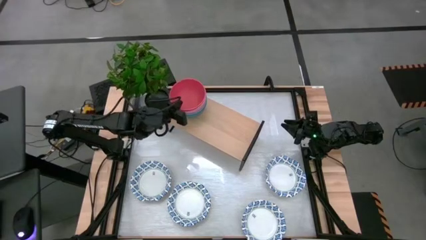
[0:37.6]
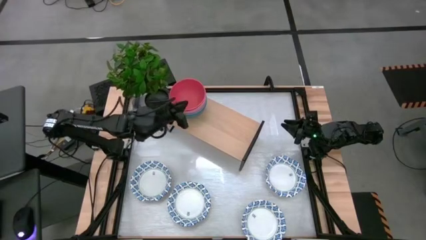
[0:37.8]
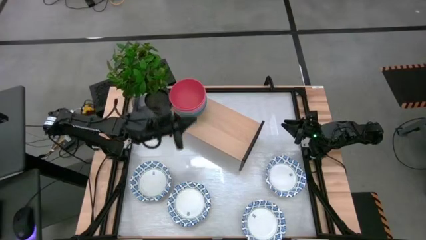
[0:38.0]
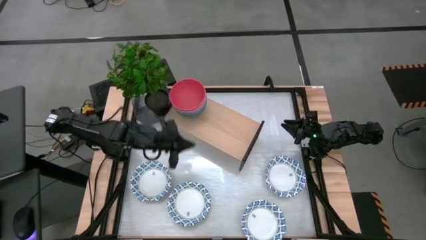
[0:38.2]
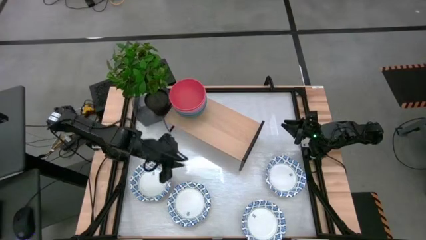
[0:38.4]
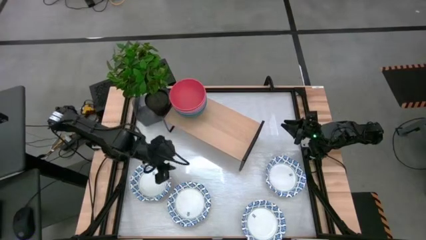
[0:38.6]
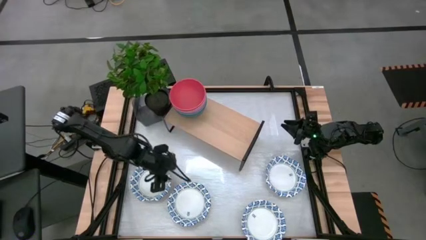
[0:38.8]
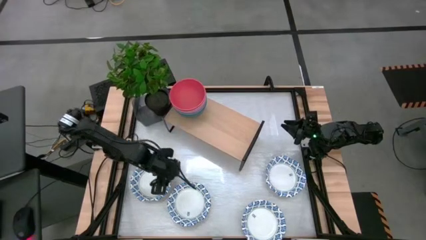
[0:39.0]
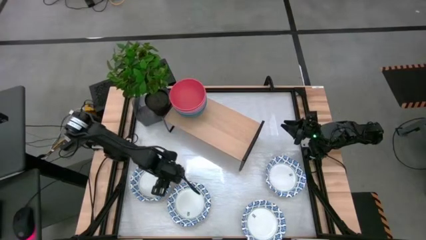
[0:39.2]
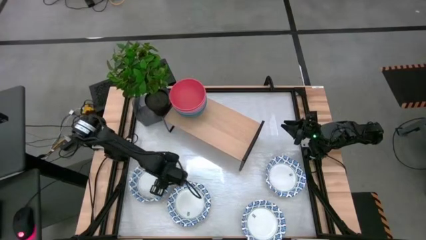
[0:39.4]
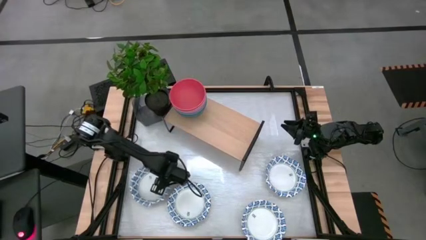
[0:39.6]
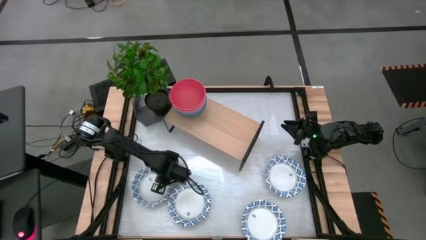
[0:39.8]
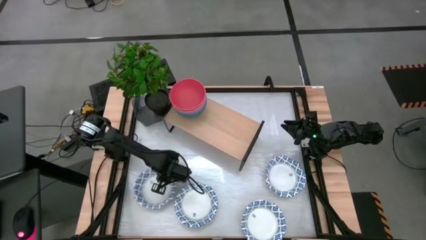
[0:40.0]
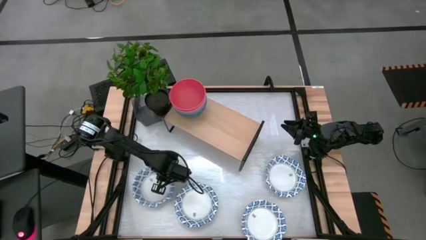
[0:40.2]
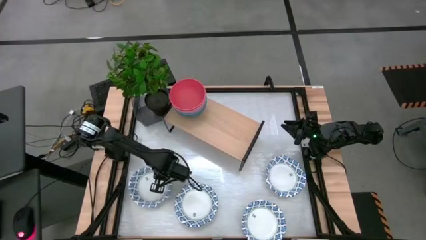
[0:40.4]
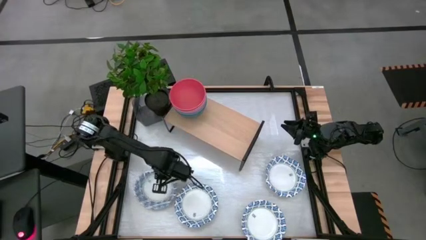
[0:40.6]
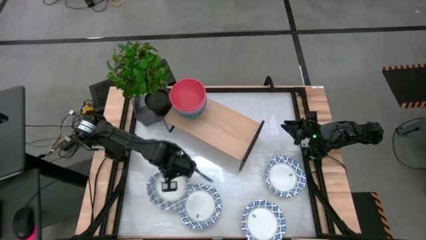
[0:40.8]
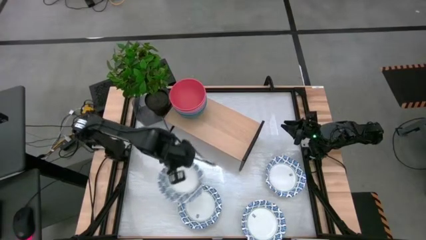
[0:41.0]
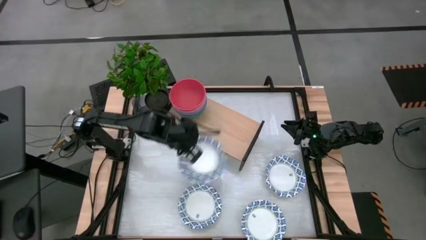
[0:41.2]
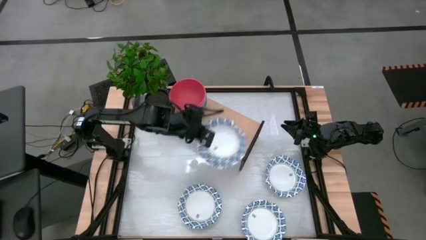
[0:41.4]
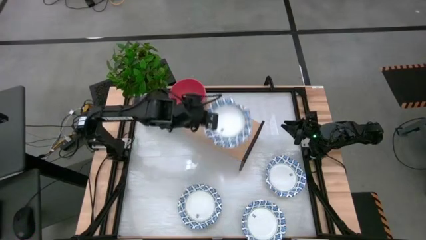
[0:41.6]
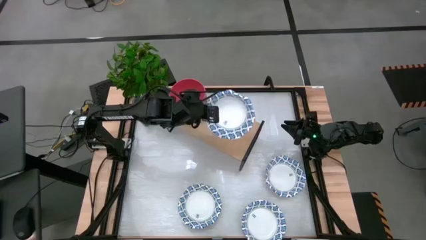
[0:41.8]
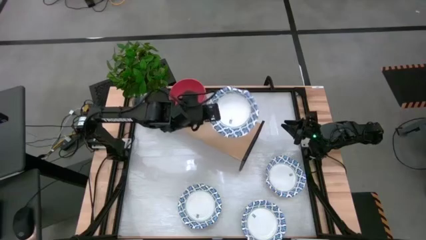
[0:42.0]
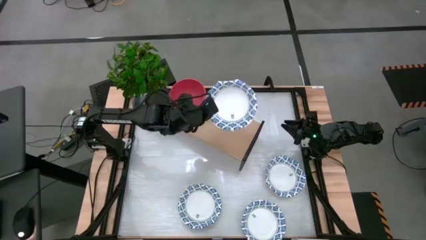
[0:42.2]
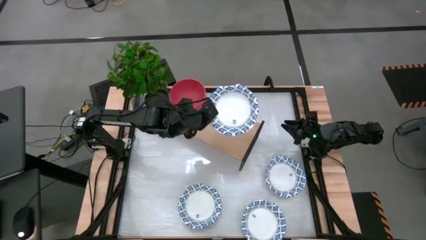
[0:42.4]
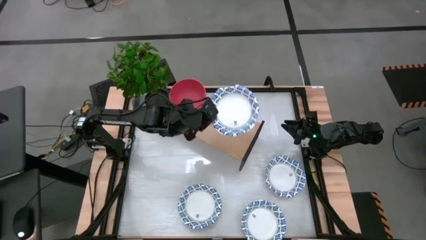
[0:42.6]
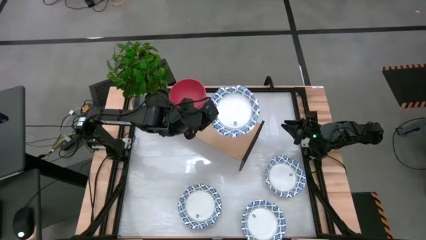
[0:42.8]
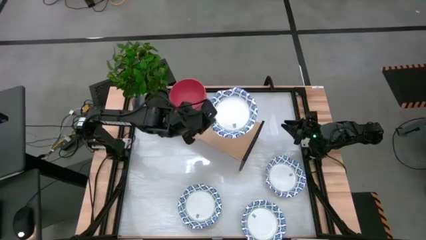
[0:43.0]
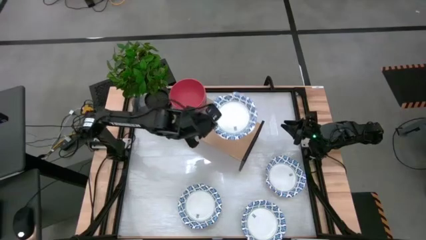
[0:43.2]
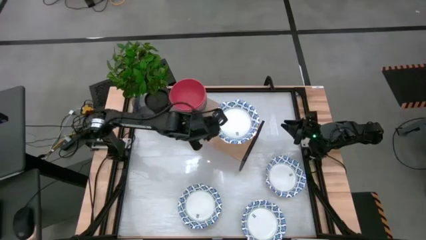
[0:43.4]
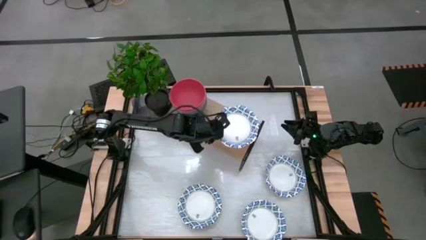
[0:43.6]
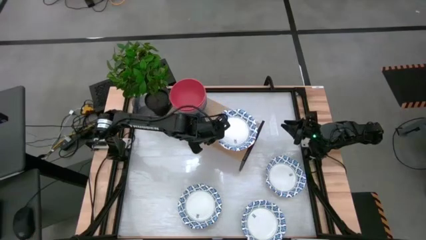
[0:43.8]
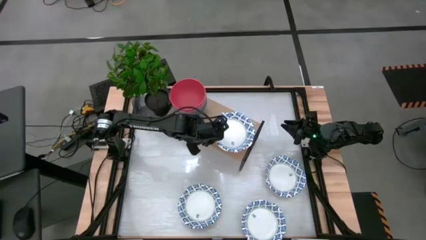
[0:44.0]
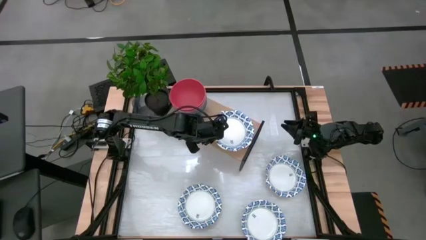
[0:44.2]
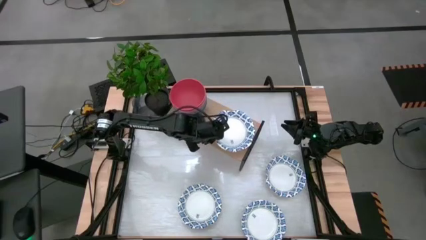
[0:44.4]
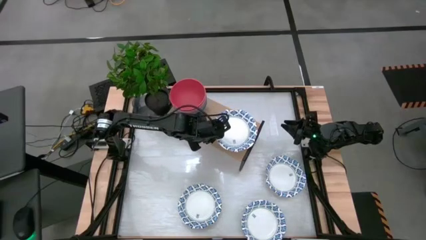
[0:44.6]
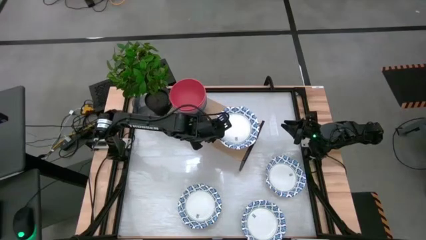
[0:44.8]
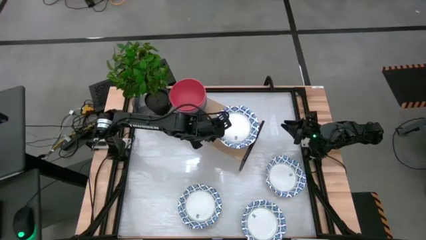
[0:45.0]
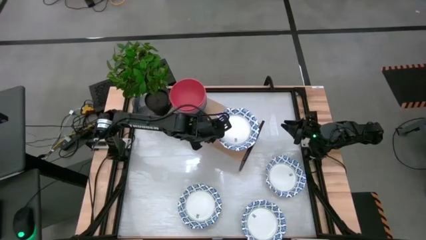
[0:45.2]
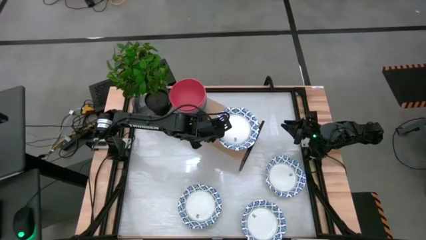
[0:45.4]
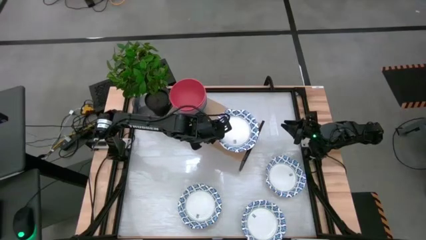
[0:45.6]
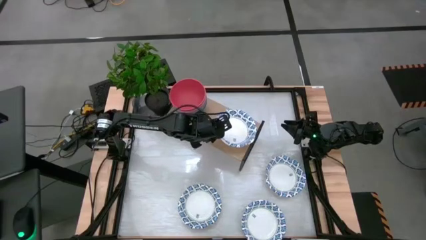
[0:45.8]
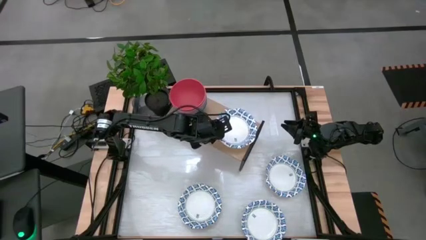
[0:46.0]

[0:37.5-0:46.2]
Task: Place and stack bowls onto a shelf
Put the white patterned bowl on the shelf

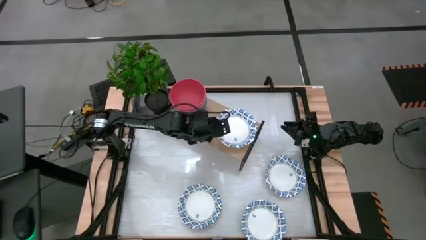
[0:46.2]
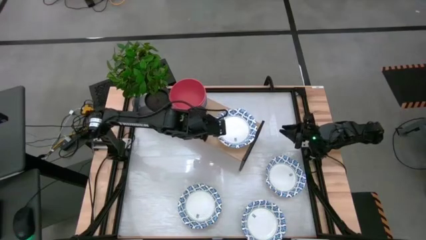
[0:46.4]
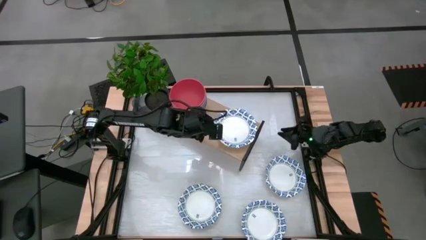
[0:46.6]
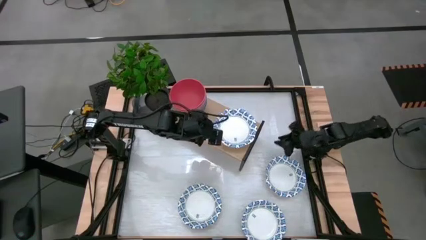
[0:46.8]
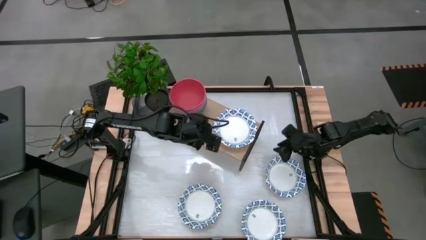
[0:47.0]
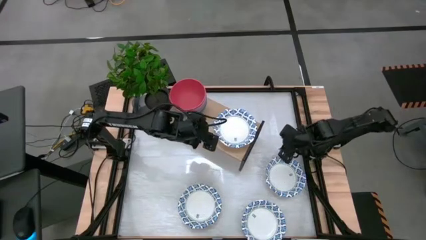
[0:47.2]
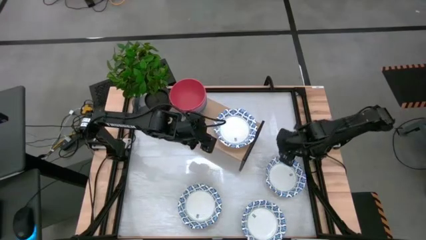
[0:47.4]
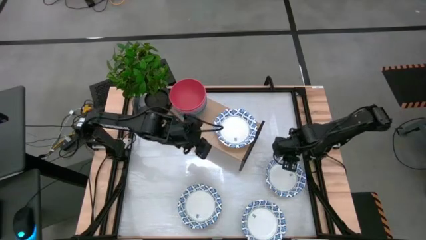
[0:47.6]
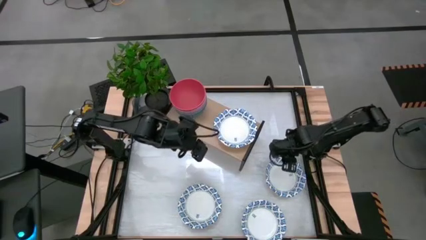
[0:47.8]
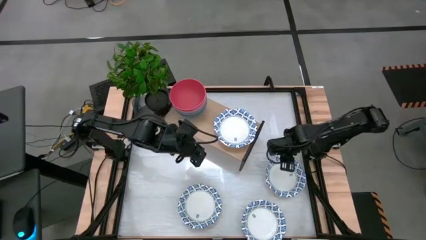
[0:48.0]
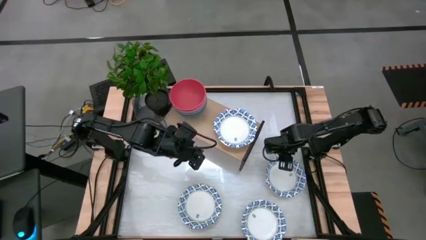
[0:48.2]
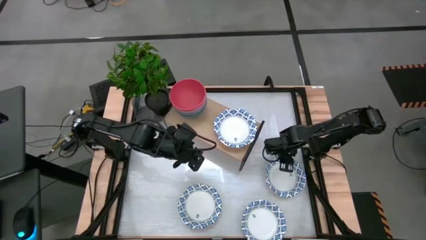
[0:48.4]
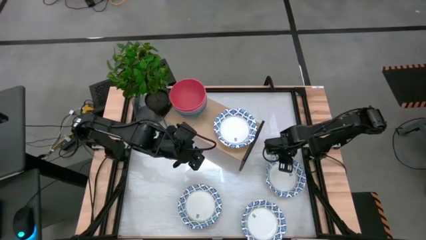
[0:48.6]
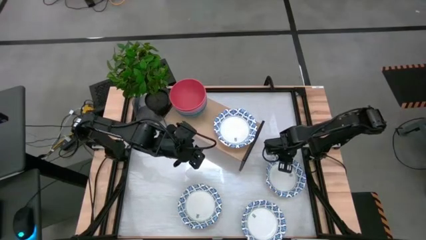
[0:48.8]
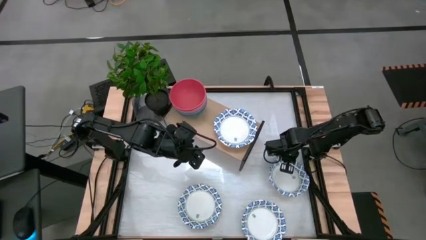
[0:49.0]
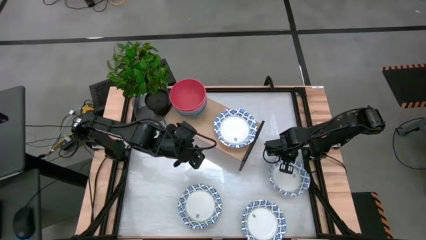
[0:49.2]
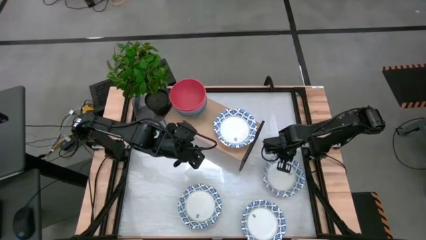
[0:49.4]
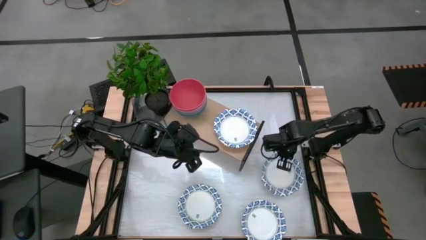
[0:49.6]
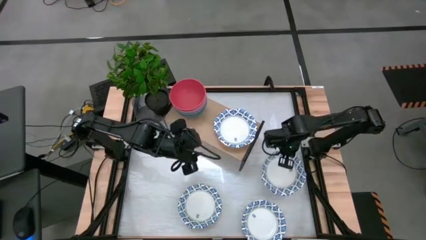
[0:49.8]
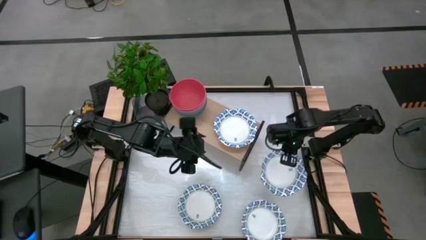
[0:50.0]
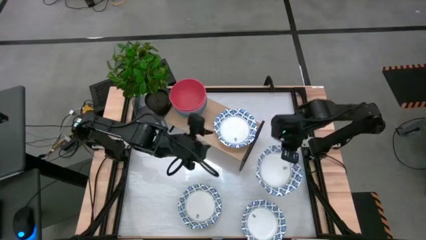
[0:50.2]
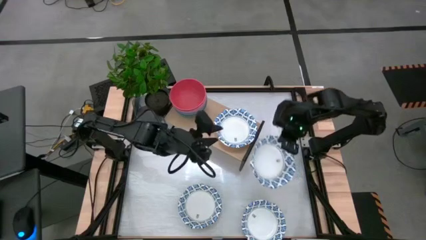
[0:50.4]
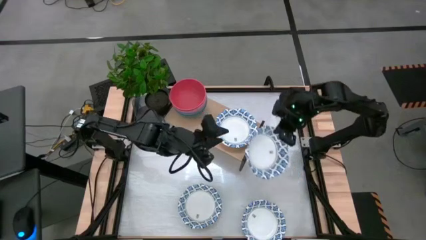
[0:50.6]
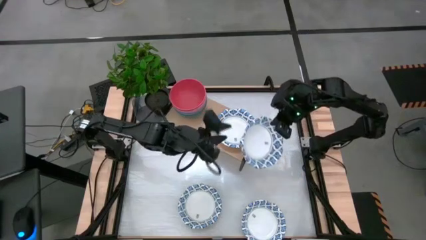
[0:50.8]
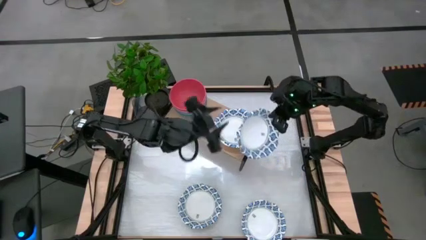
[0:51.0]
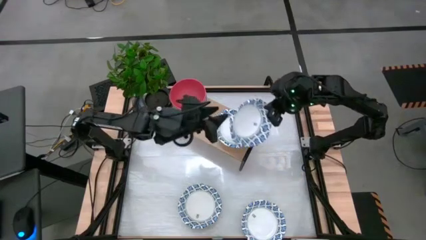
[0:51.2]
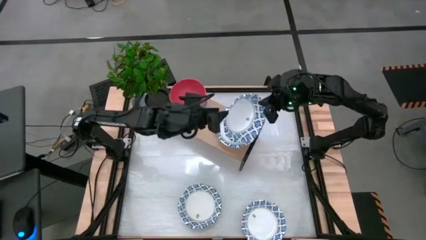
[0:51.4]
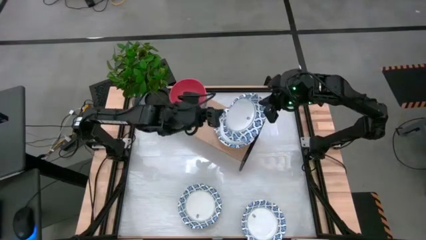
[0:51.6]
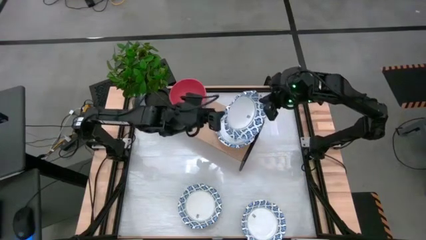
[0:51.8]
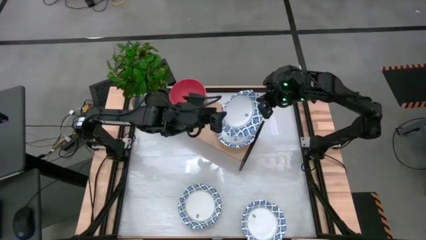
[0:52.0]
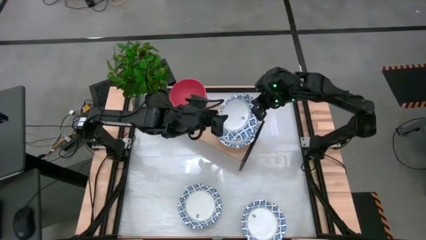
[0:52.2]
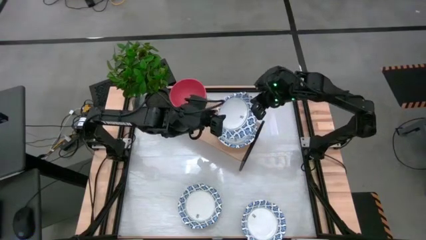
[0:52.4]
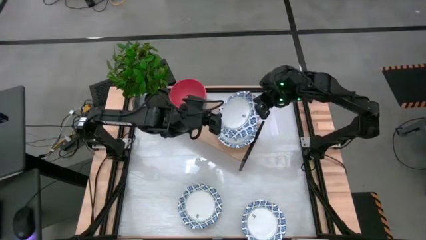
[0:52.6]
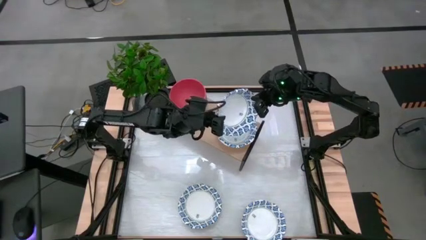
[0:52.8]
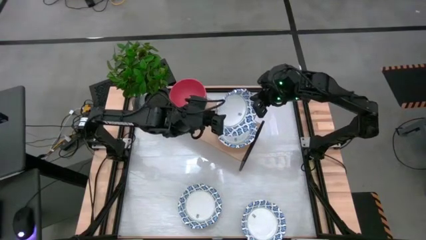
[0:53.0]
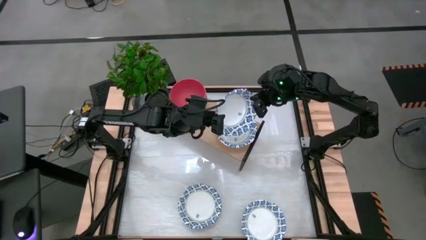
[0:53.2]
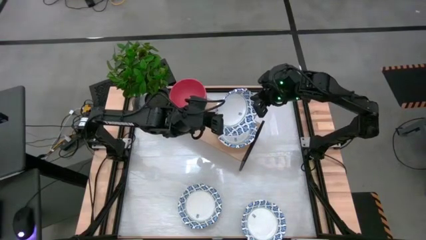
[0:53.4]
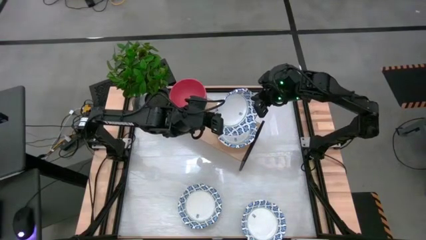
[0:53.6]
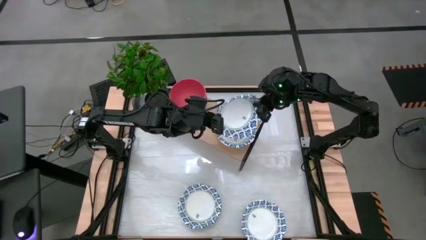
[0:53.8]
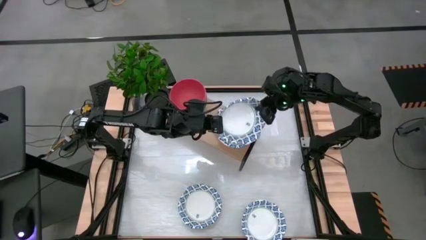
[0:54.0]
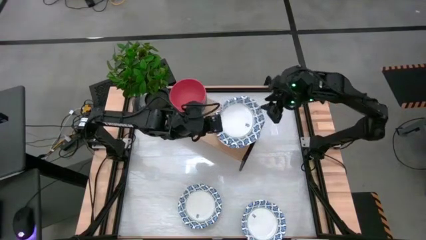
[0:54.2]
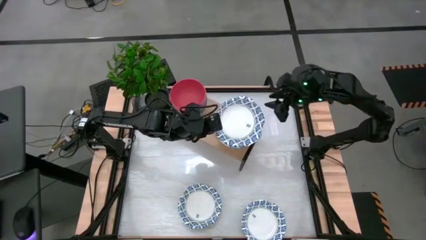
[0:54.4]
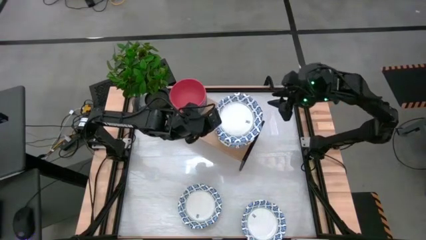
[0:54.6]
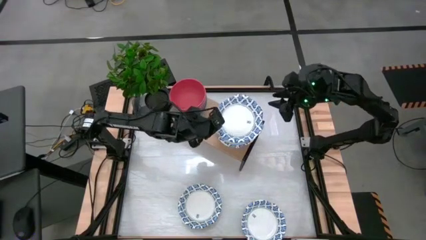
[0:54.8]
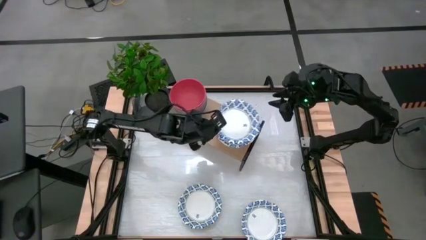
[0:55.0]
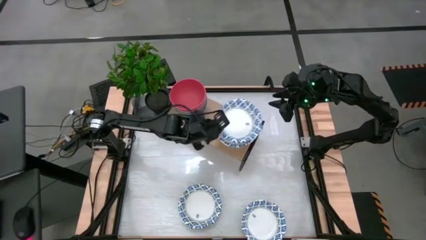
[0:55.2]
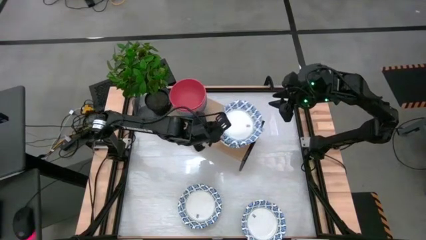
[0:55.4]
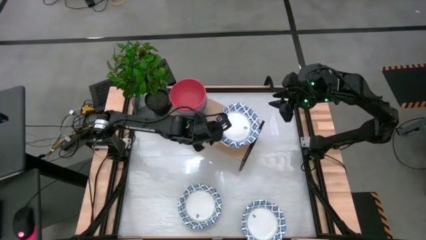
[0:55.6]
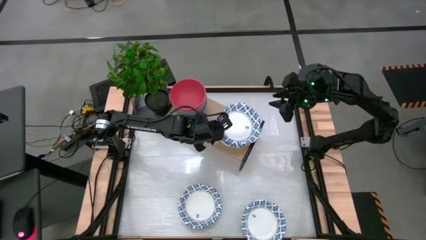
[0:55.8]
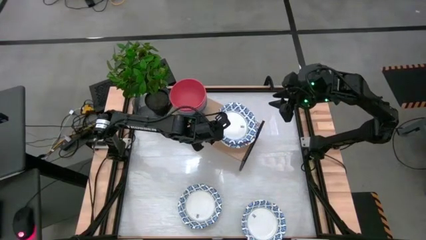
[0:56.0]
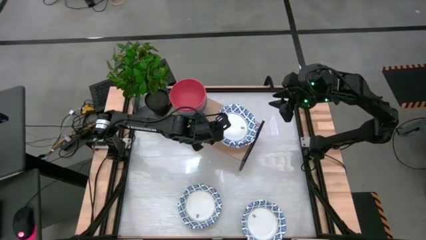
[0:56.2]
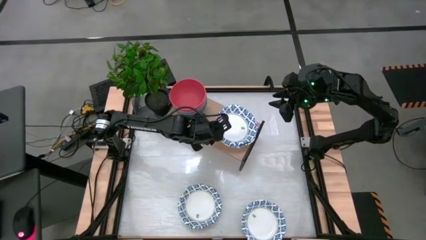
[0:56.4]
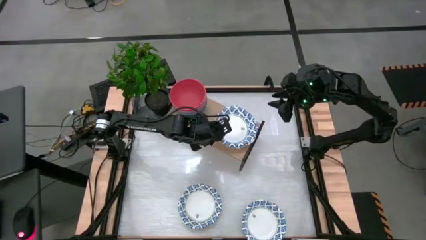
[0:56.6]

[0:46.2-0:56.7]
Stack the white patterned bowl on top of the other white patterned bowl on the shelf
